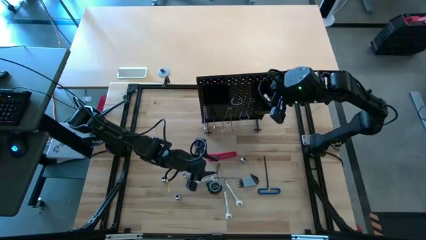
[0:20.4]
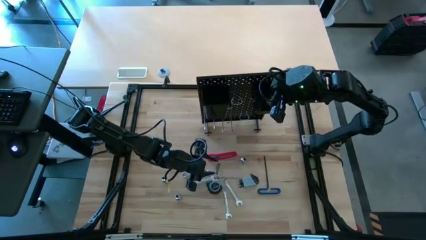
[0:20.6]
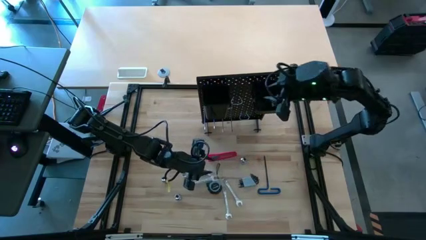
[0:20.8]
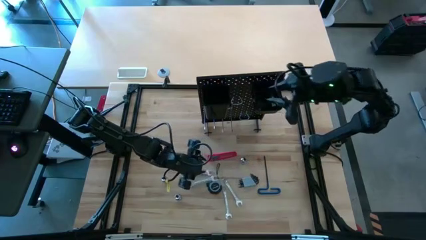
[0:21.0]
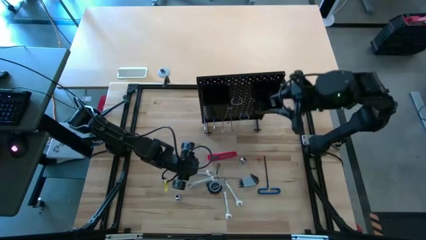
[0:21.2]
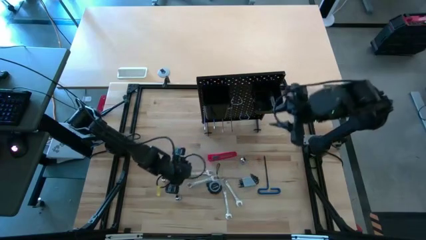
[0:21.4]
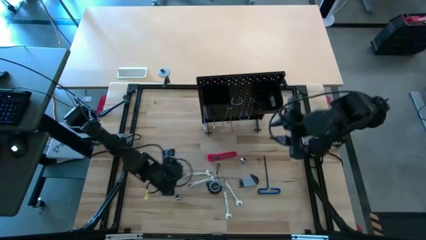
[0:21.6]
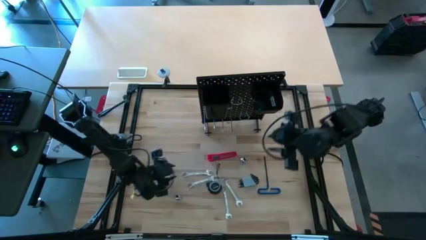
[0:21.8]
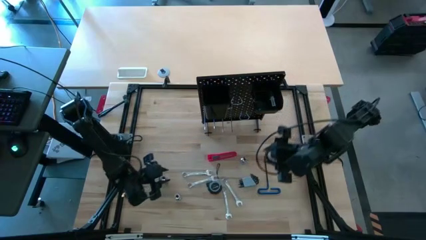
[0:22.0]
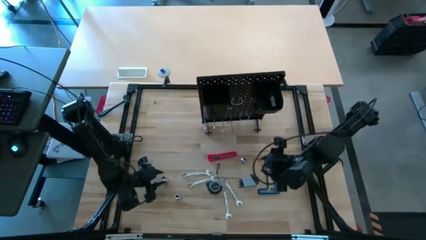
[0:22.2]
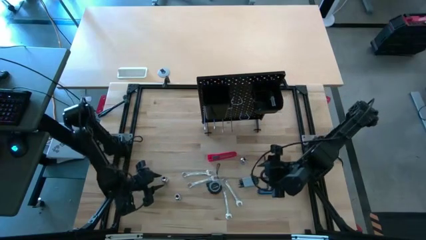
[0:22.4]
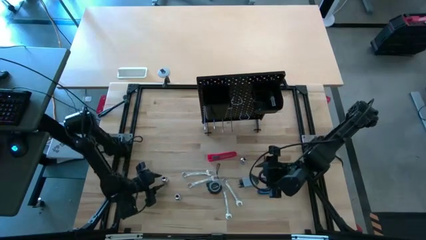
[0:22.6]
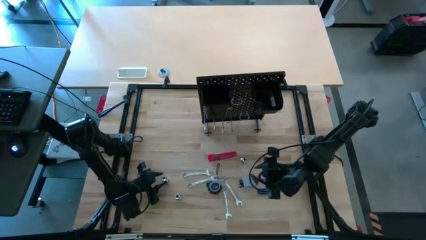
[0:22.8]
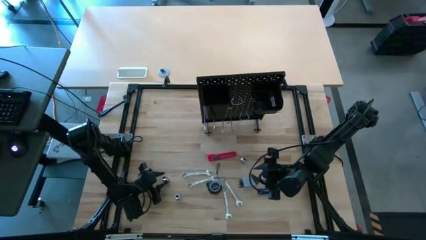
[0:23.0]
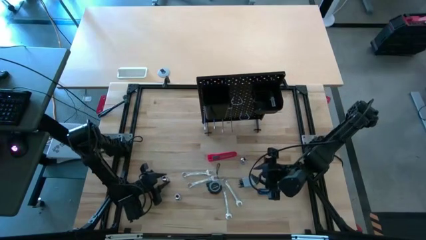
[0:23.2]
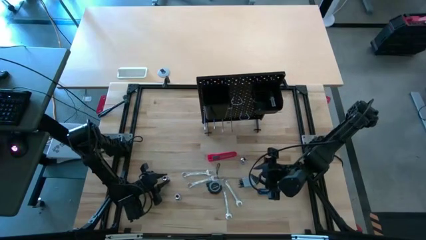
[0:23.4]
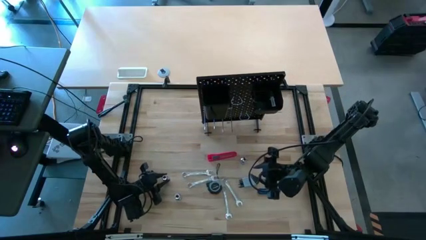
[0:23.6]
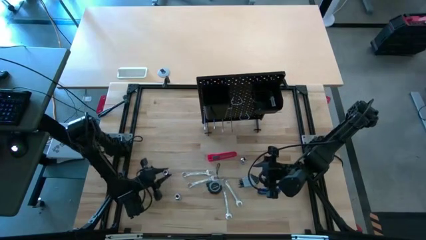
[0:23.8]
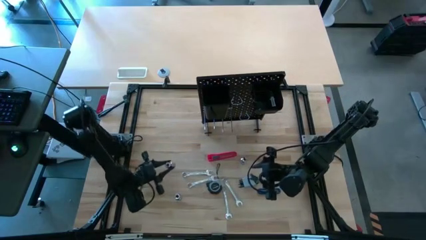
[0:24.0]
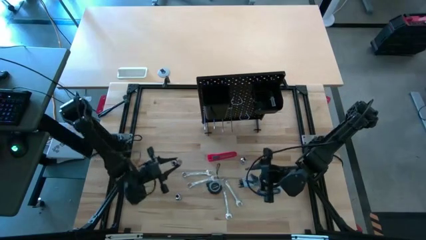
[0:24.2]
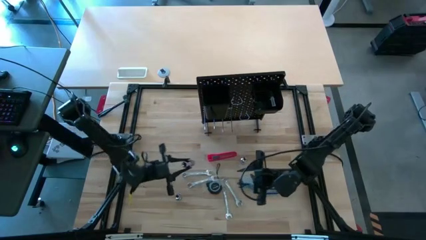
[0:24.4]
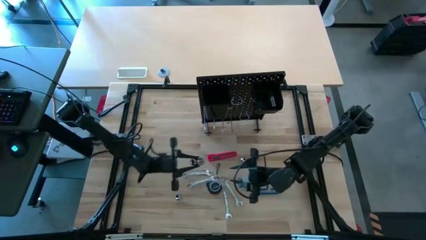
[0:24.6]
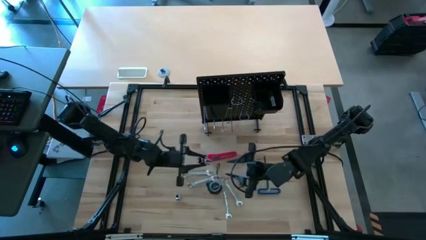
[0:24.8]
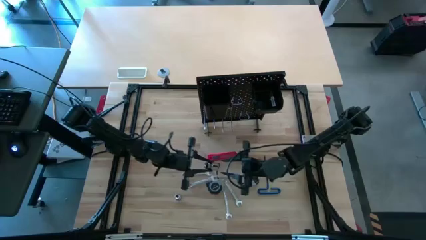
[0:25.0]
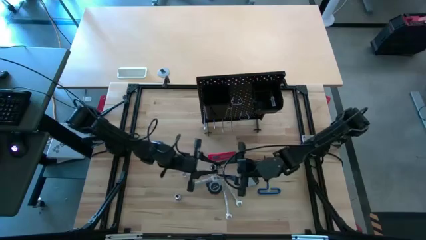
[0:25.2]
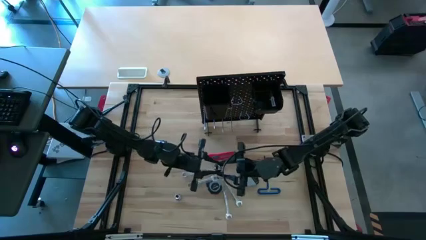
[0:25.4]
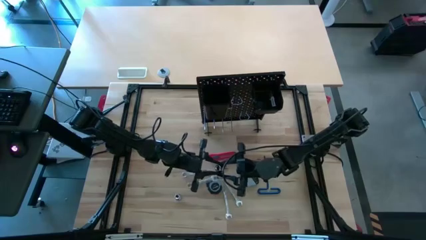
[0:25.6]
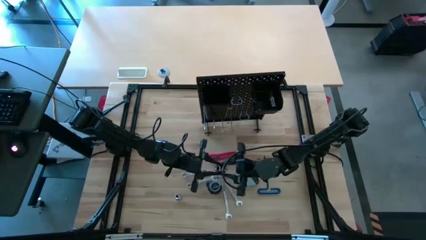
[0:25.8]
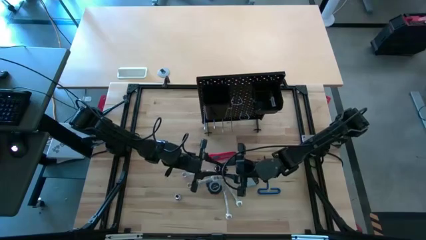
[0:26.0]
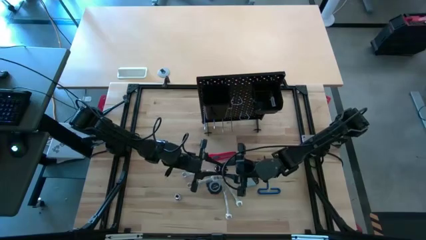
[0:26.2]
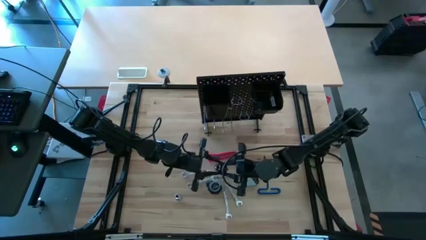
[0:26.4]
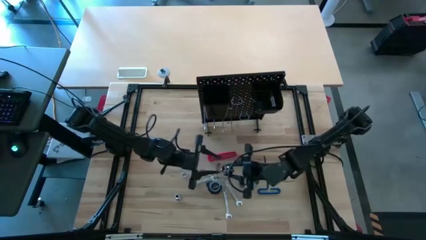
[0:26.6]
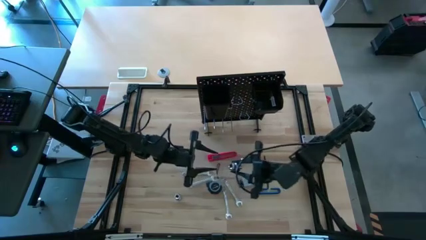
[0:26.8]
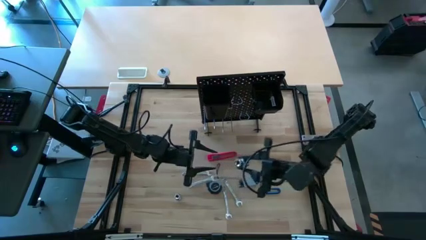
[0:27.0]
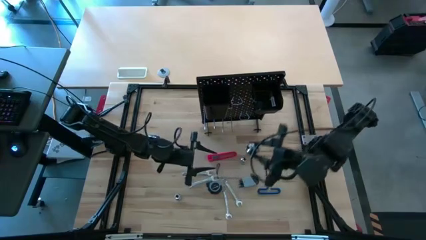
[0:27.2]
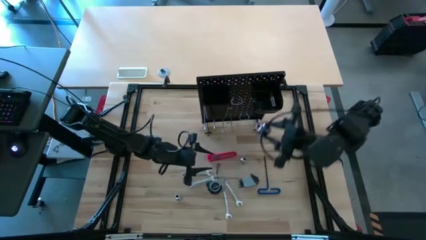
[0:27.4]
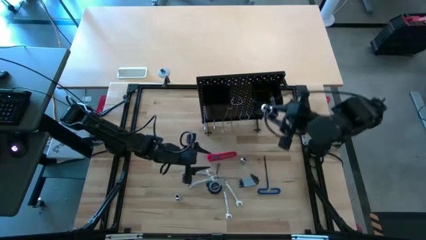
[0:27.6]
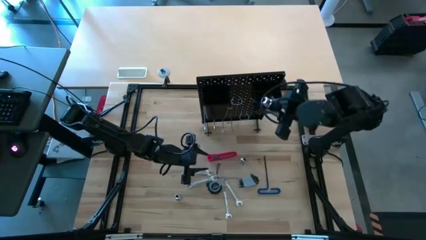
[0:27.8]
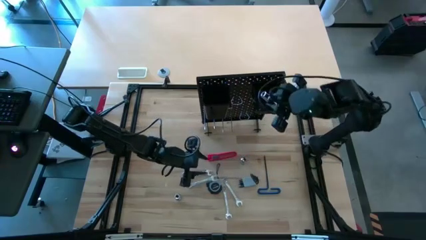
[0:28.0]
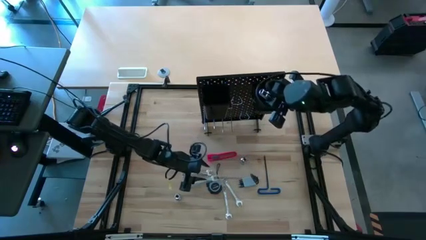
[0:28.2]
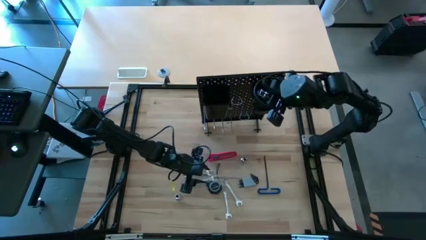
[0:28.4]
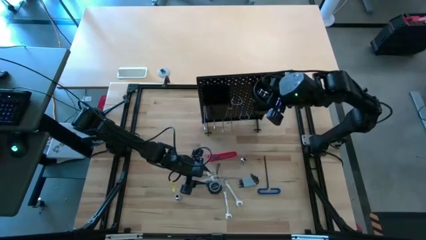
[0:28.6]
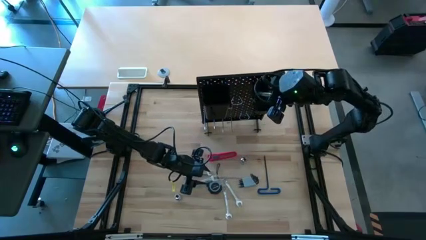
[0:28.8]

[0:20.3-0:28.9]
Task: Hang tools onto peg board
Put the top left socket into the peg board

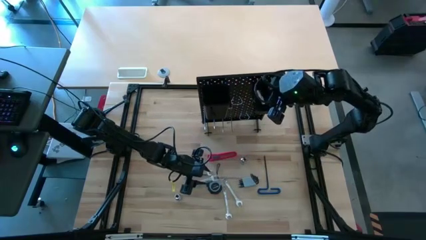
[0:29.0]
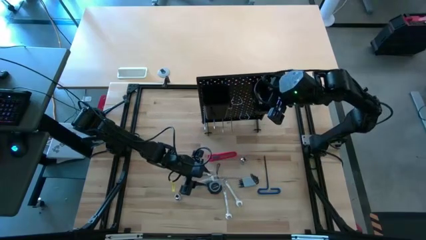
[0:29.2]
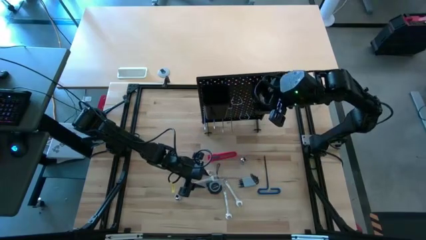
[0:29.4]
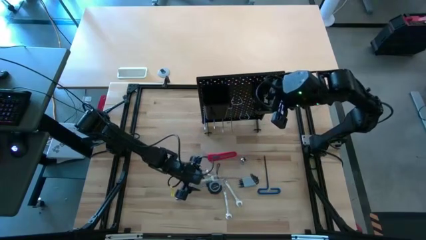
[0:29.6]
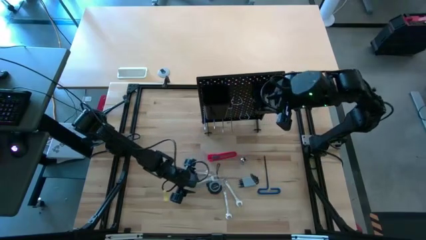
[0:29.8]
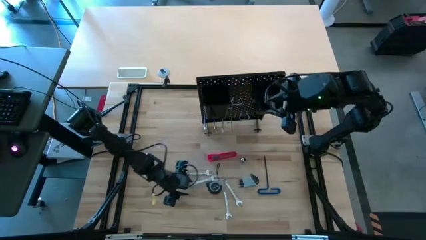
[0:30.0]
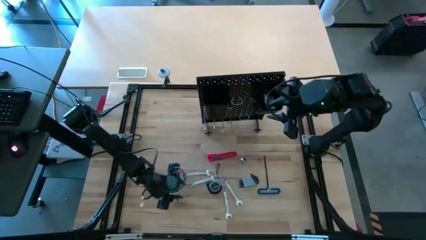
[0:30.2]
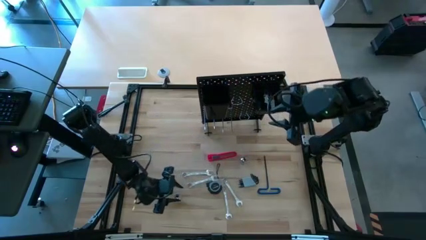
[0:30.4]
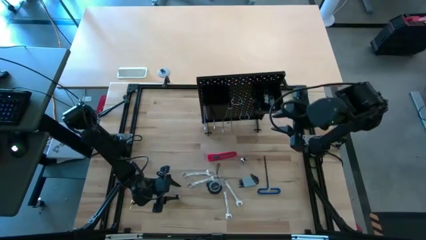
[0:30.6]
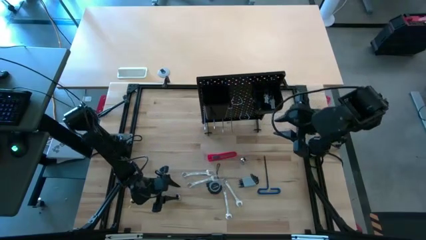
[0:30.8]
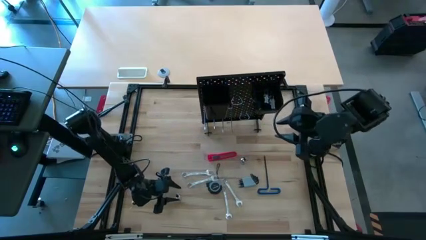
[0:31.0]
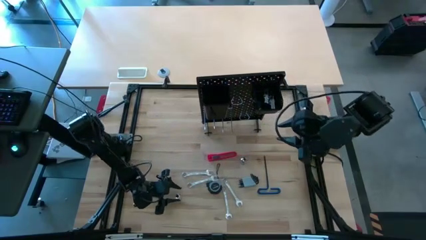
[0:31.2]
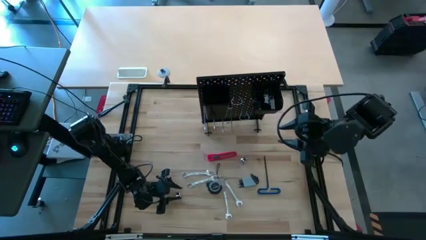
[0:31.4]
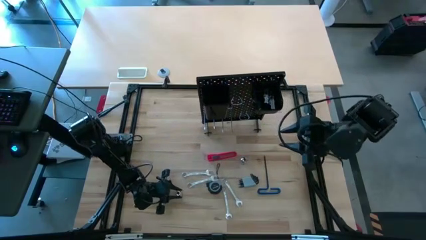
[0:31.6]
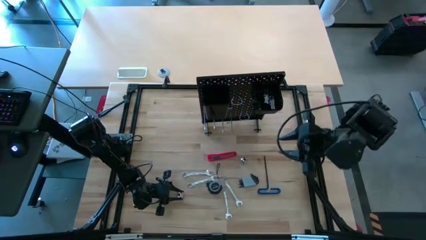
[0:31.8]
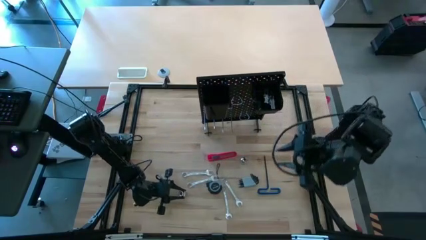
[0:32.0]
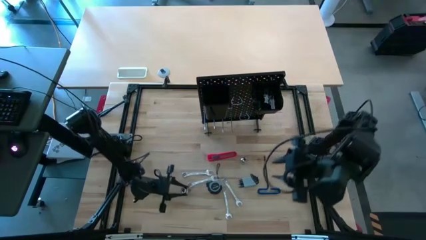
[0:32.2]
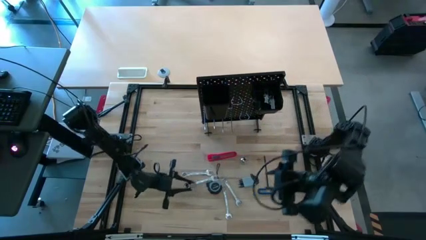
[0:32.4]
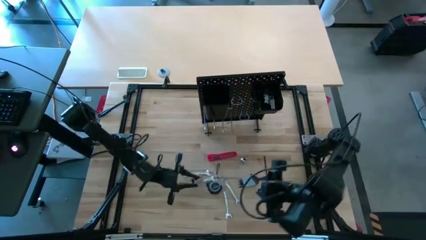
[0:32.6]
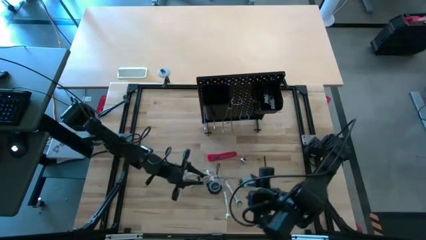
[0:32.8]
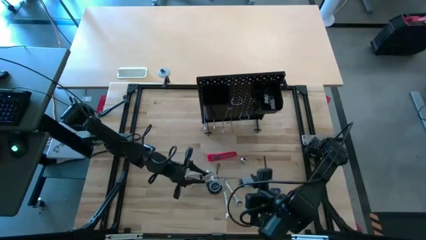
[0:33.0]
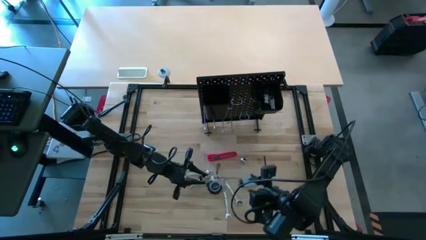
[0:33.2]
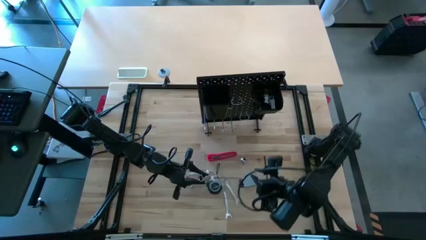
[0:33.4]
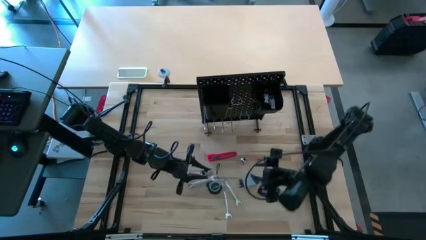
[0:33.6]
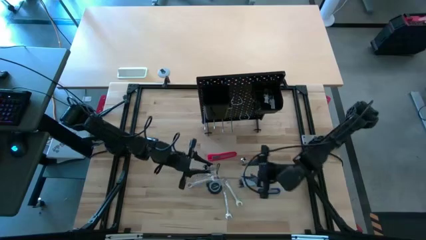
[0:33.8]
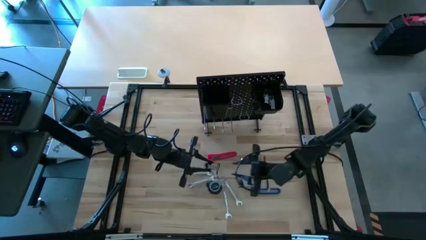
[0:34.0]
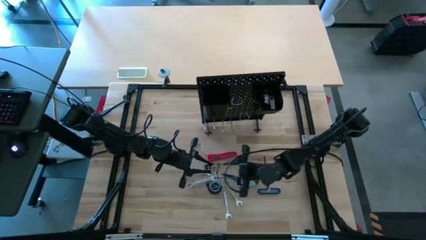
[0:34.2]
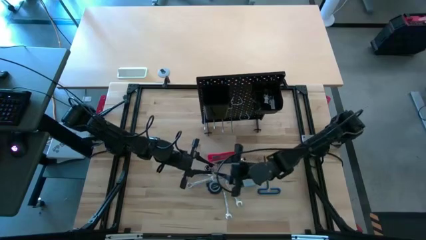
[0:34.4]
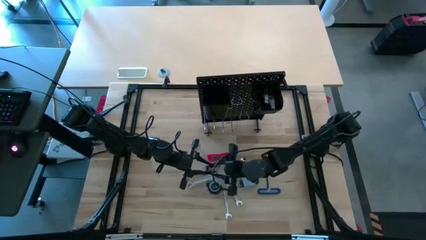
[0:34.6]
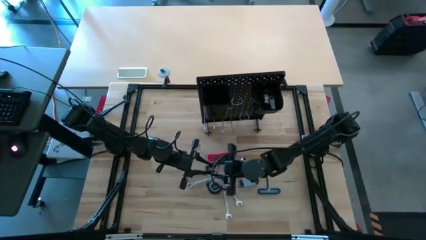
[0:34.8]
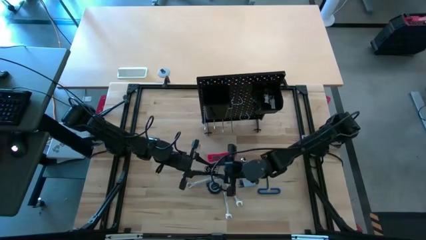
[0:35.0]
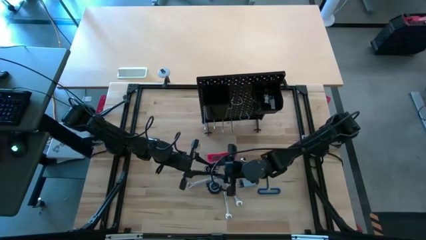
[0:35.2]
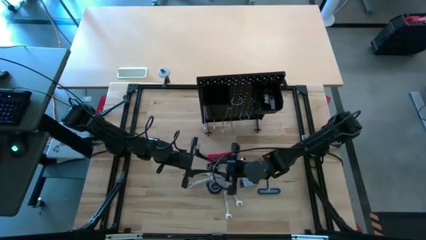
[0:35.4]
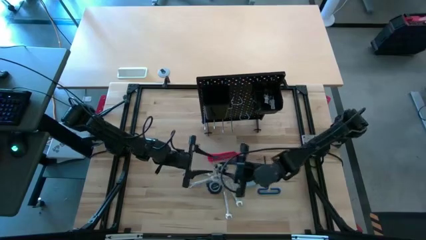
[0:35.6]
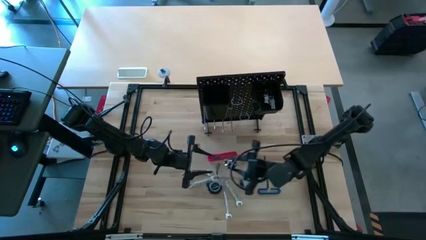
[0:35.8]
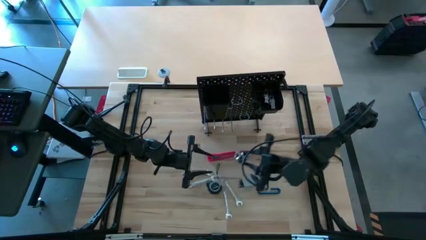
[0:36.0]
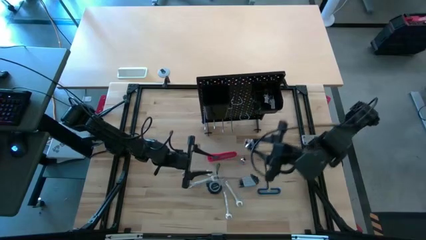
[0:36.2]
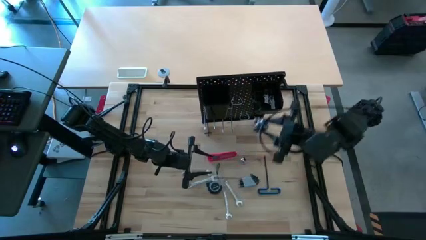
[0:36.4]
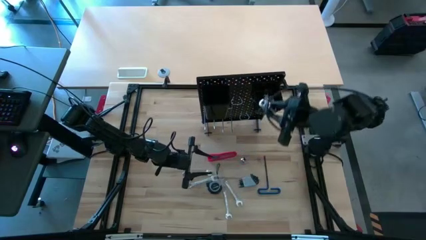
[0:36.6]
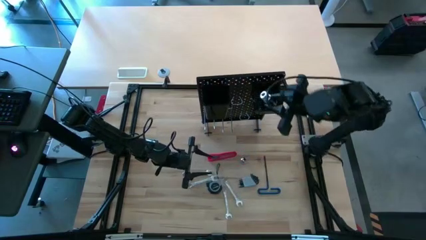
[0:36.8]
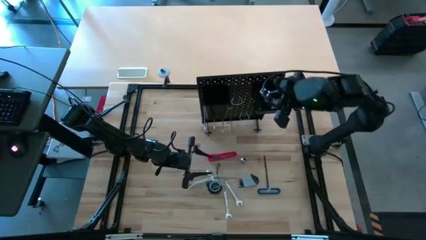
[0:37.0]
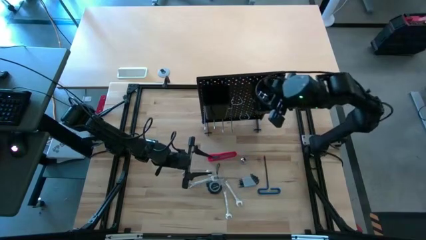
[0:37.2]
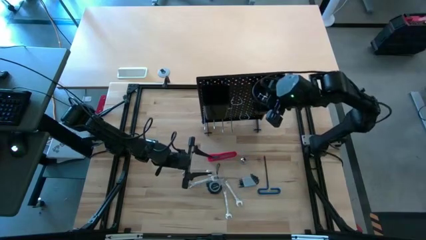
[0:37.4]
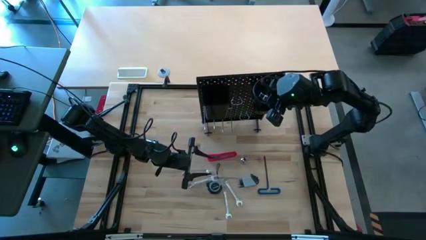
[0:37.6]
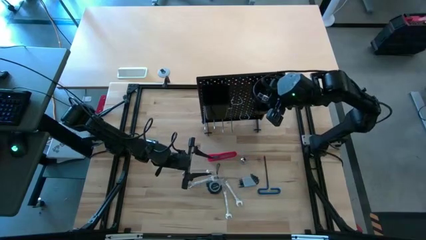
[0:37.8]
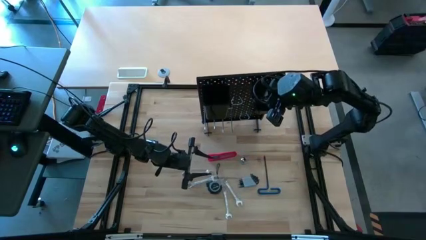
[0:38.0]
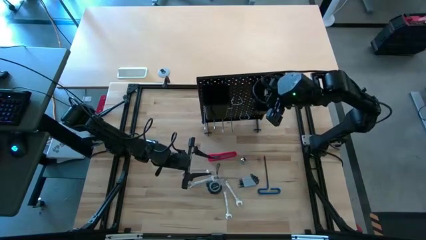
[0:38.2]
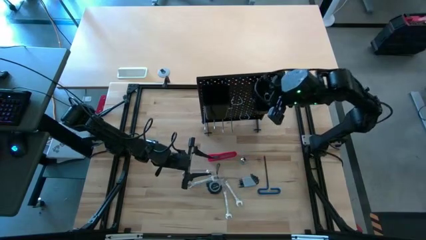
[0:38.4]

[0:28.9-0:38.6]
Put the left socket into the peg board
